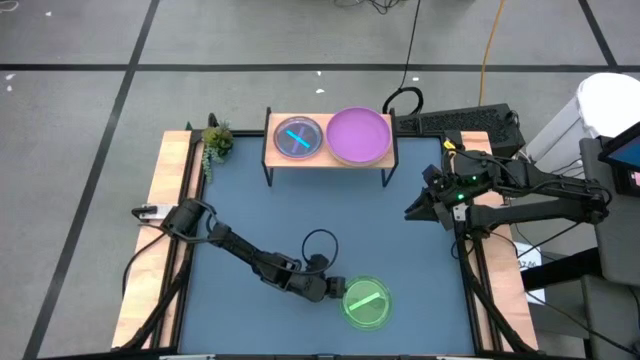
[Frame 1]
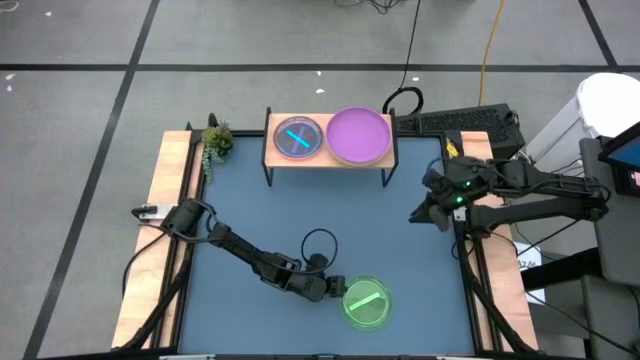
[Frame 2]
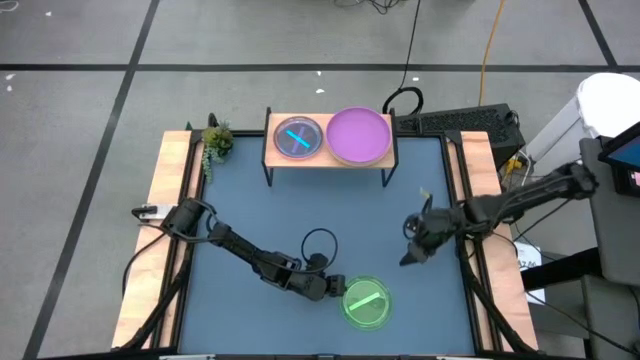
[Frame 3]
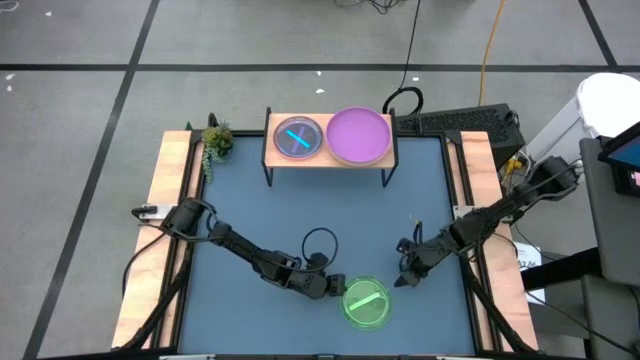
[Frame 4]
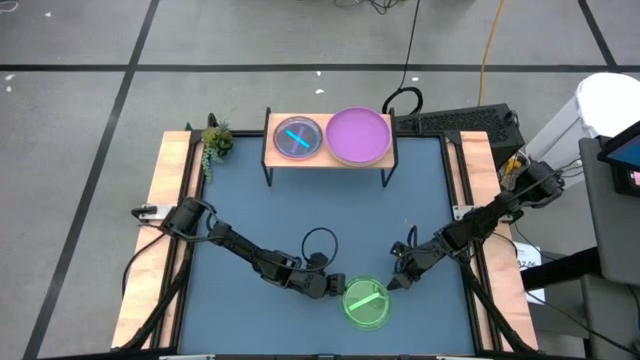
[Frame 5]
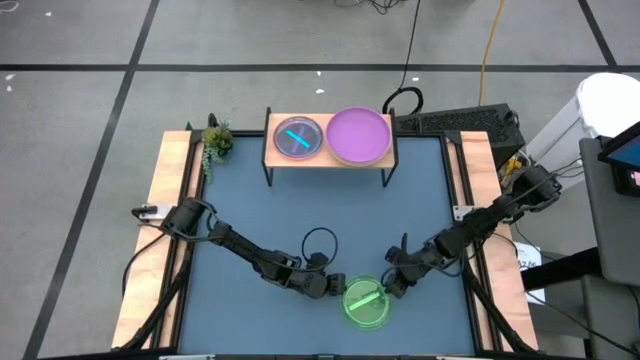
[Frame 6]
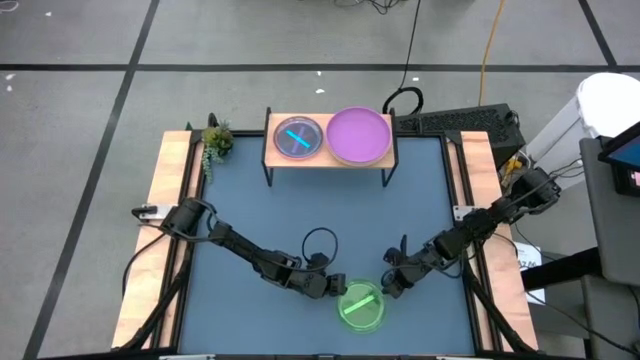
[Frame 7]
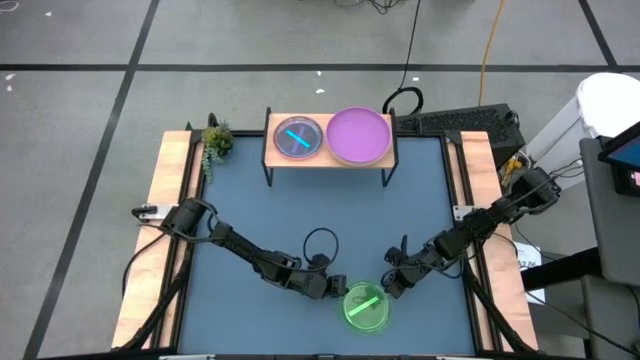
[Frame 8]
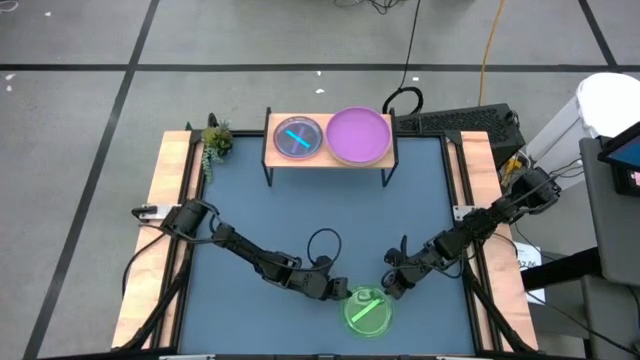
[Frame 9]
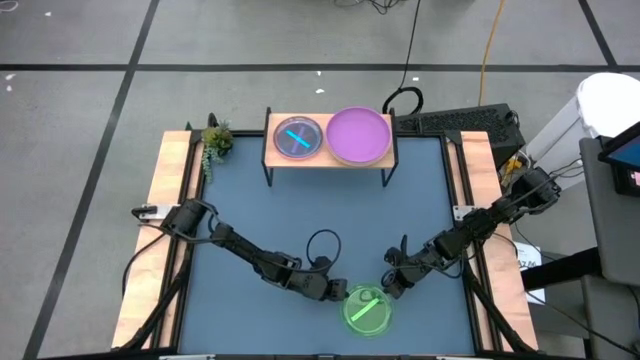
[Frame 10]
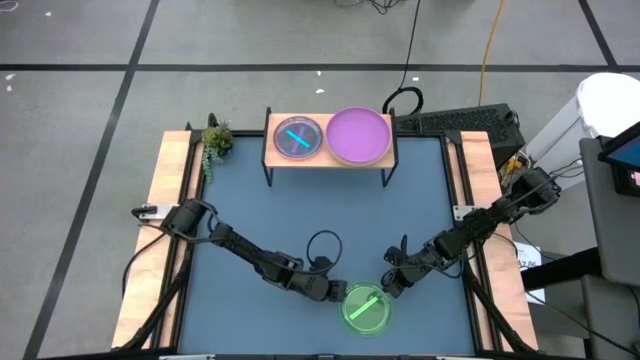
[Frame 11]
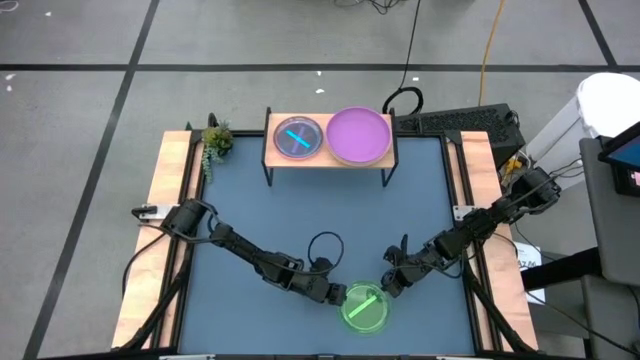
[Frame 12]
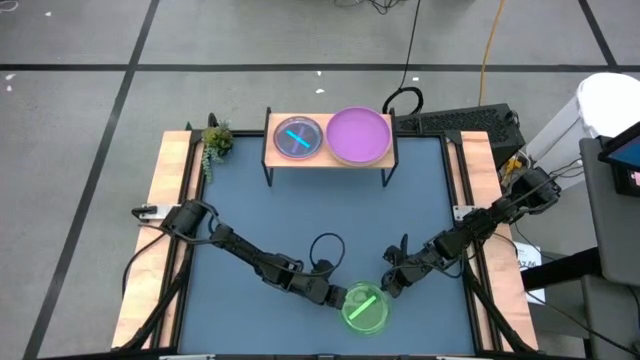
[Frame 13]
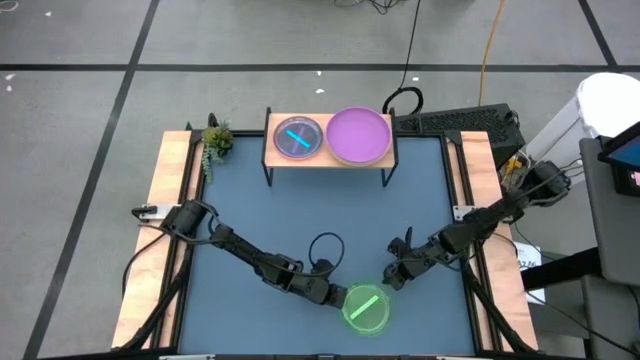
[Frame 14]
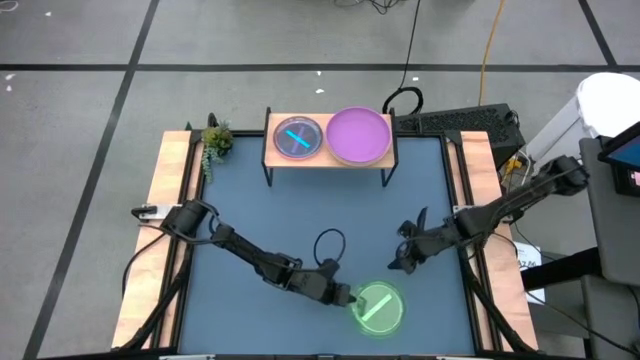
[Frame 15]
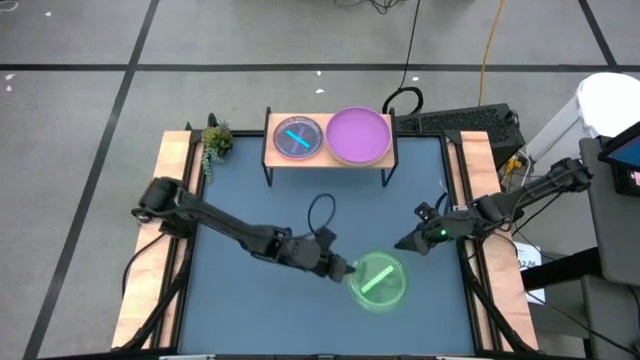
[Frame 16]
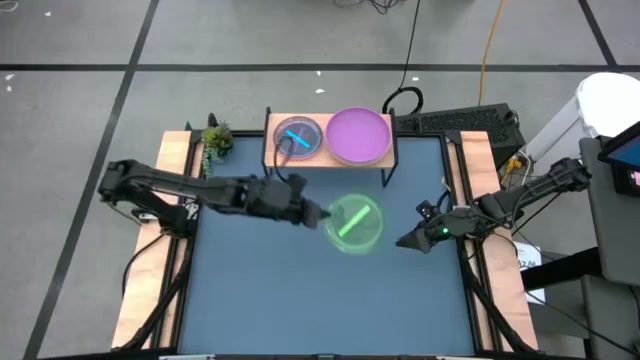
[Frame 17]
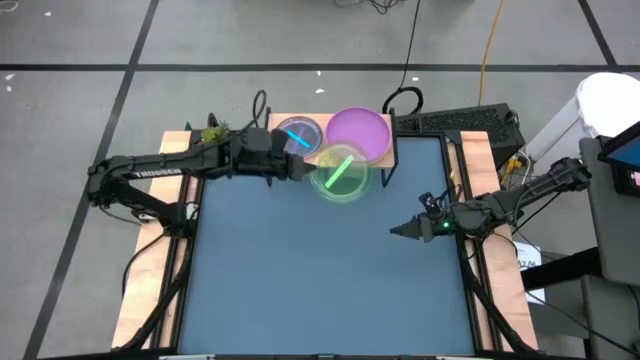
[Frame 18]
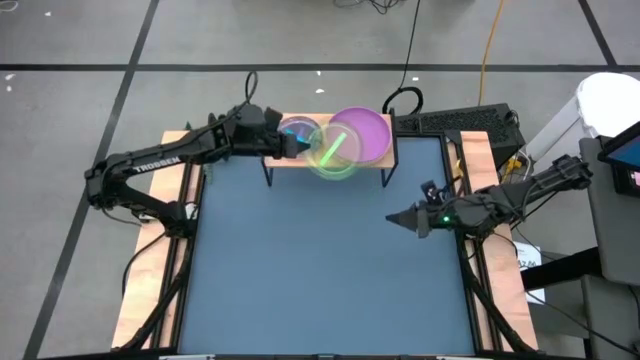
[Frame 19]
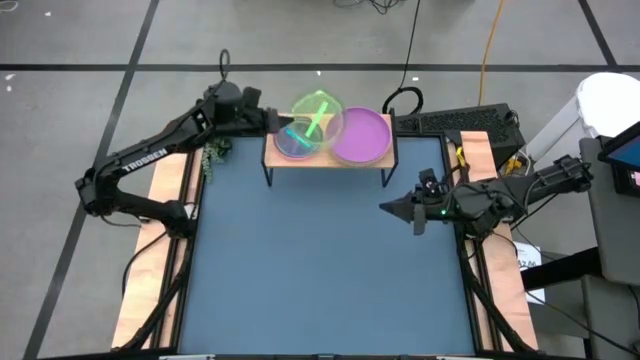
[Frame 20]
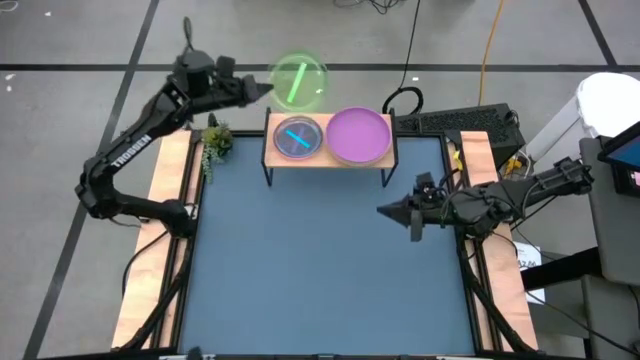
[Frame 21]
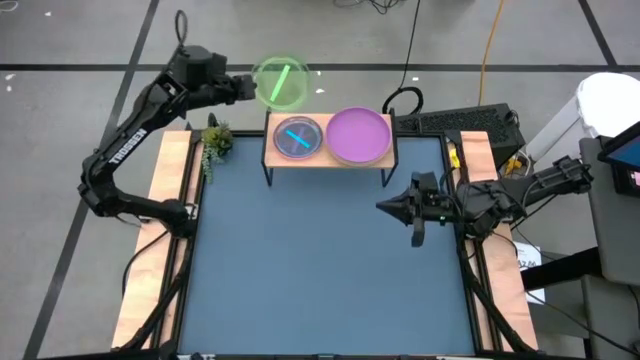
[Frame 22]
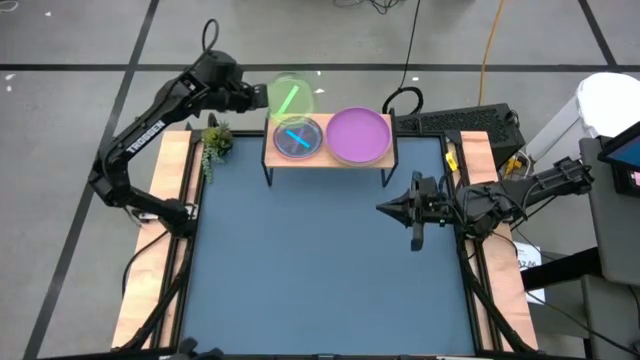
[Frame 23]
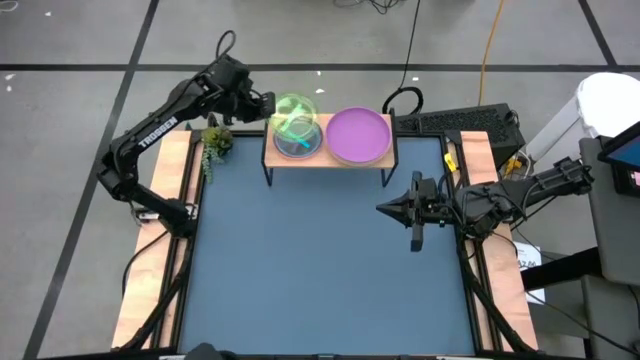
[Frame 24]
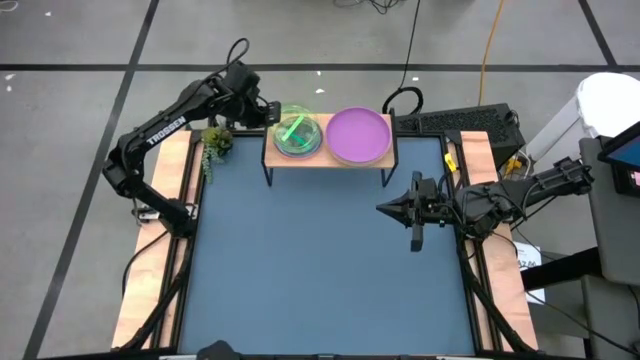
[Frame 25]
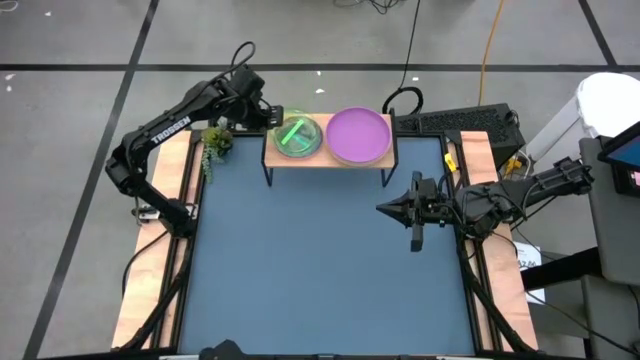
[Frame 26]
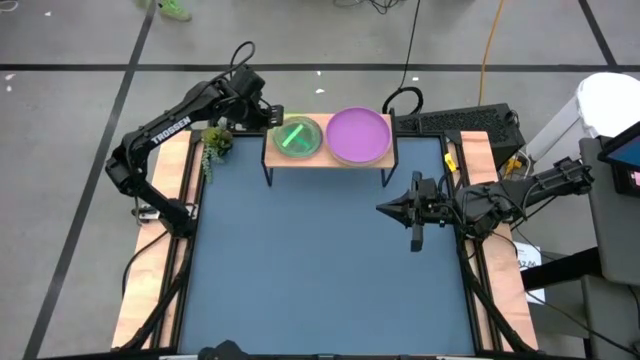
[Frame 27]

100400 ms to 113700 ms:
Task: Place and stack plates onto a shelf
Stack the green plate on top of the blue plate on the shelf

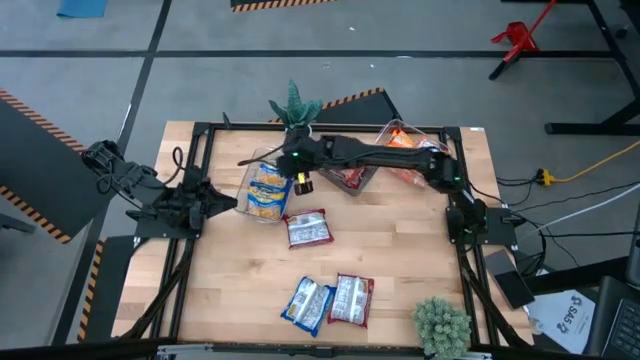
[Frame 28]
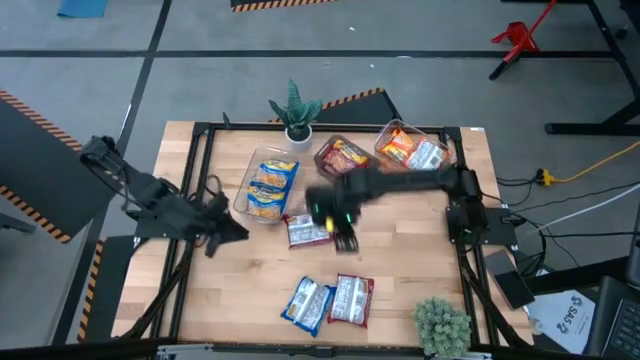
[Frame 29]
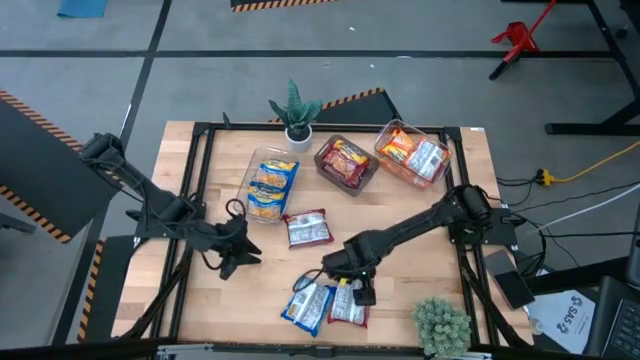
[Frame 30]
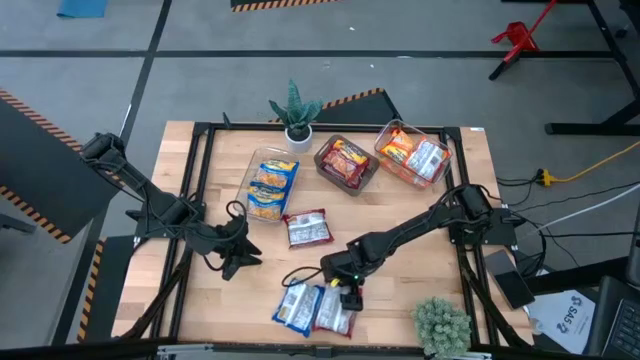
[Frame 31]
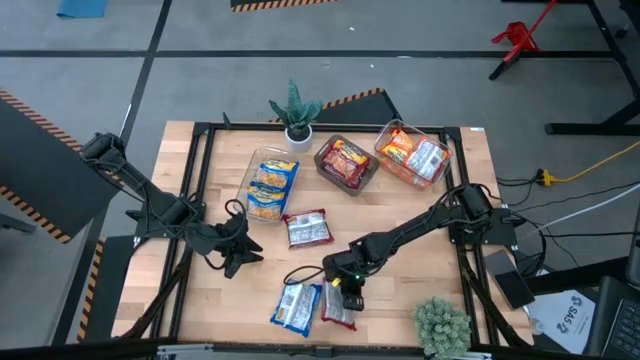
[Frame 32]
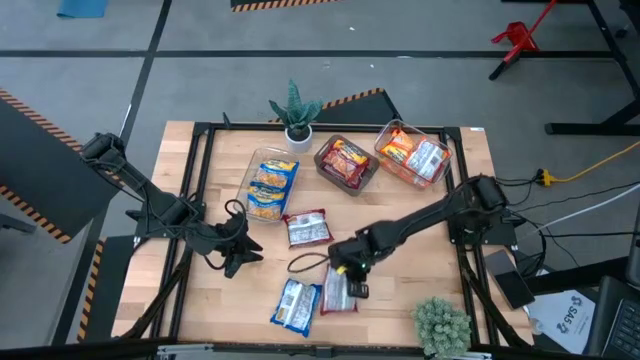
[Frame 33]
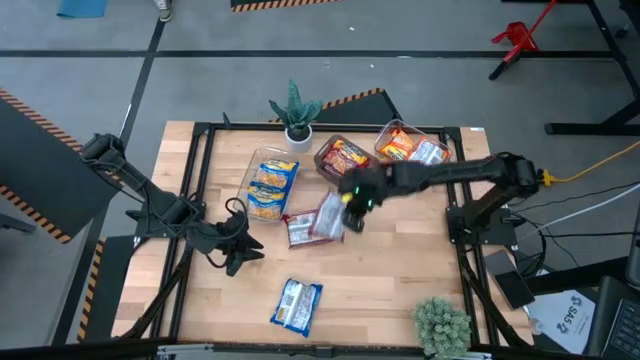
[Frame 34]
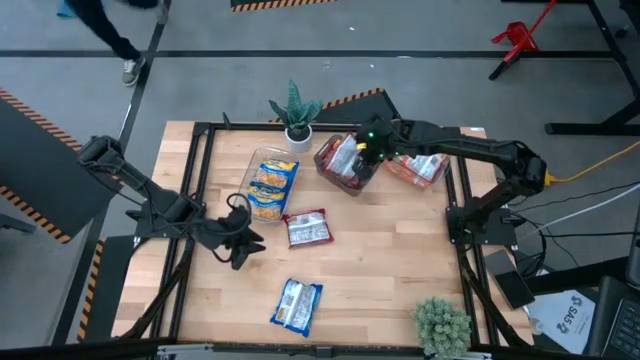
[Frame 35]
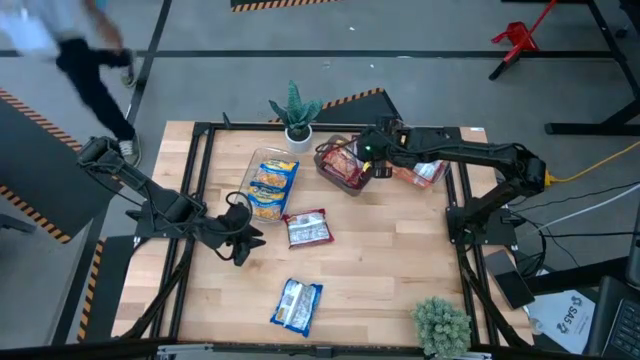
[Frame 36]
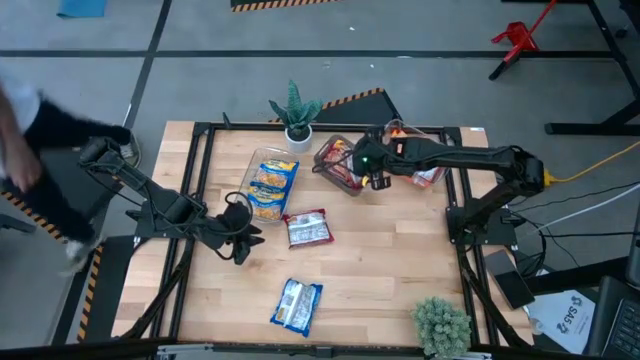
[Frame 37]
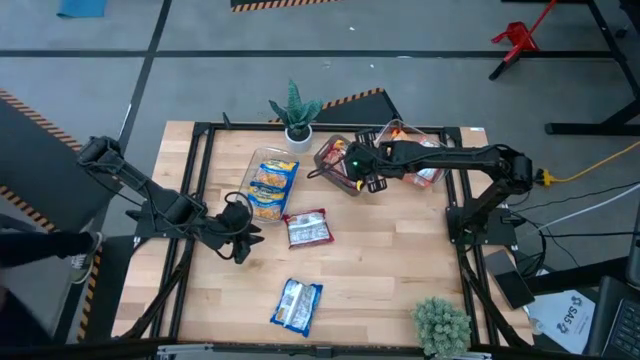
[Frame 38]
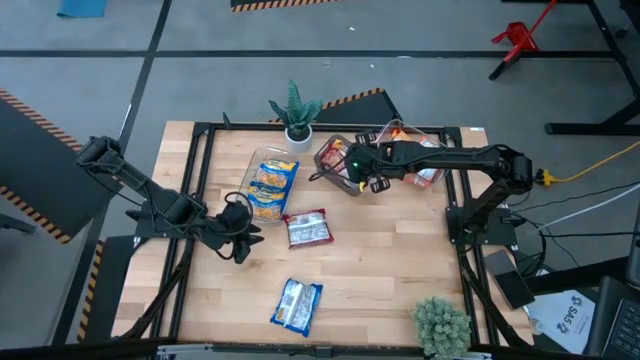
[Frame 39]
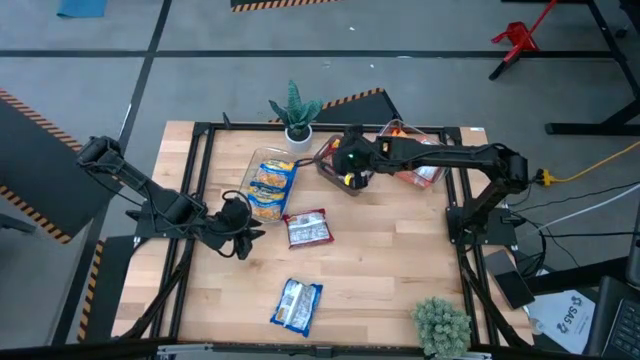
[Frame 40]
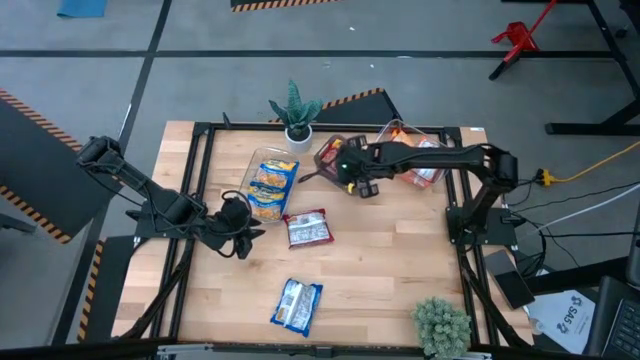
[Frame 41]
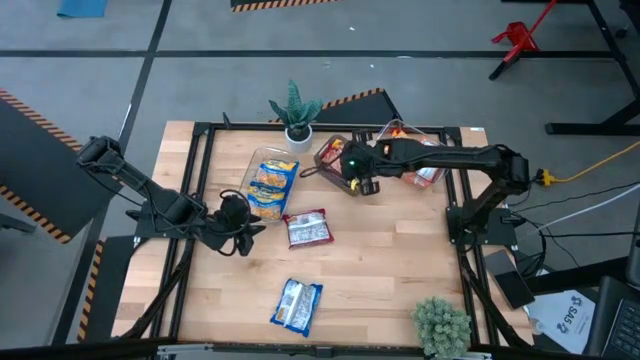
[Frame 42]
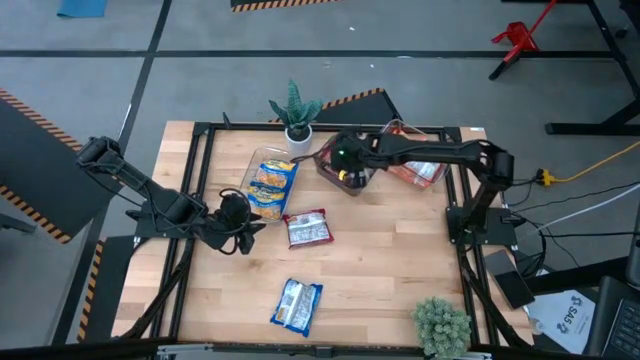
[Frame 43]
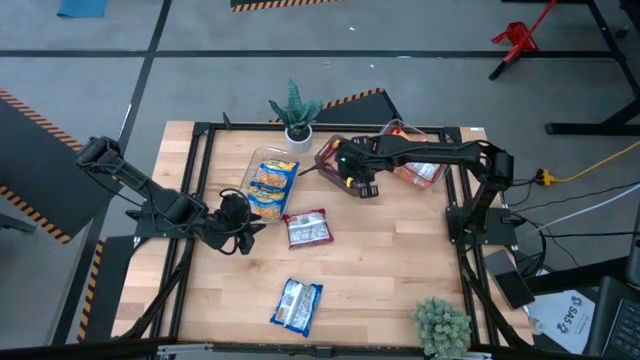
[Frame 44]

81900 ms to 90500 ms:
Task: Sort Maruchan noodles
Put the red noodle pack into the black bin
